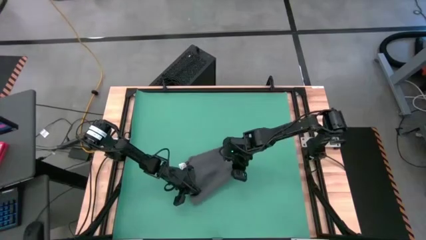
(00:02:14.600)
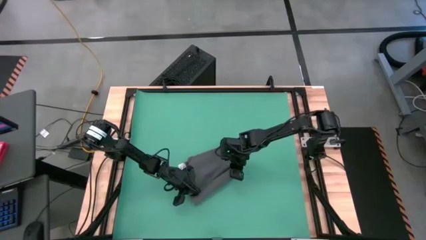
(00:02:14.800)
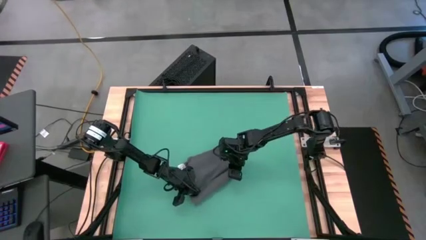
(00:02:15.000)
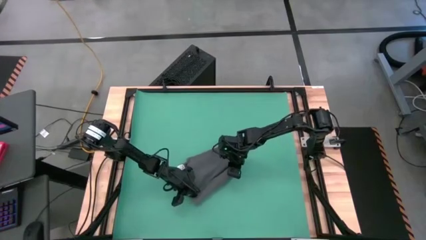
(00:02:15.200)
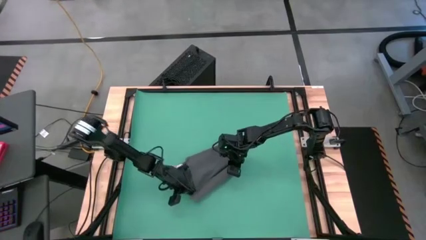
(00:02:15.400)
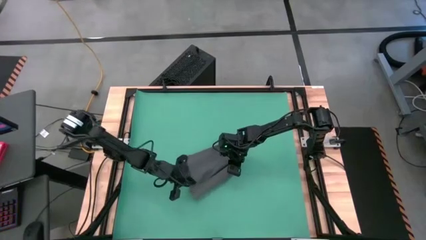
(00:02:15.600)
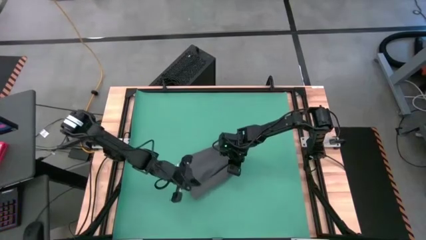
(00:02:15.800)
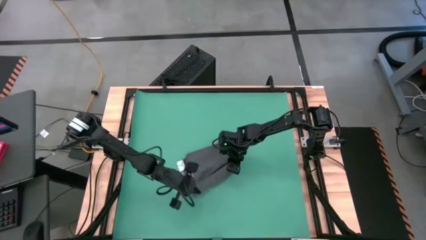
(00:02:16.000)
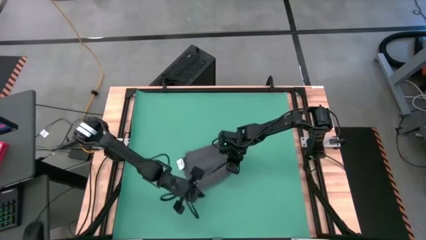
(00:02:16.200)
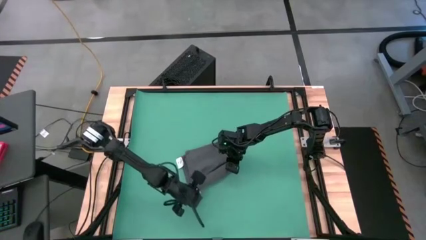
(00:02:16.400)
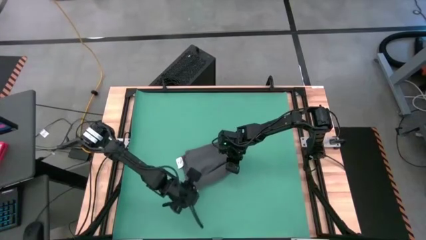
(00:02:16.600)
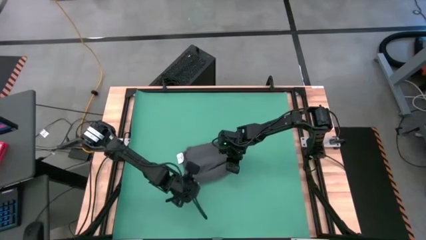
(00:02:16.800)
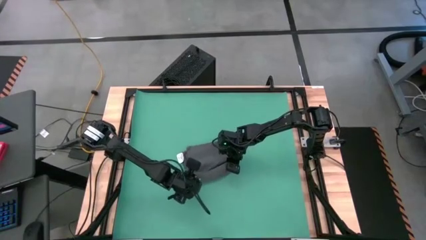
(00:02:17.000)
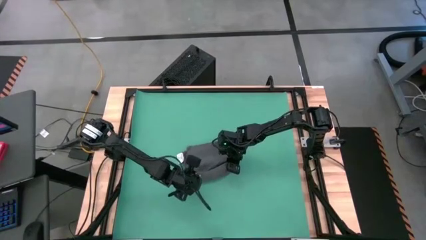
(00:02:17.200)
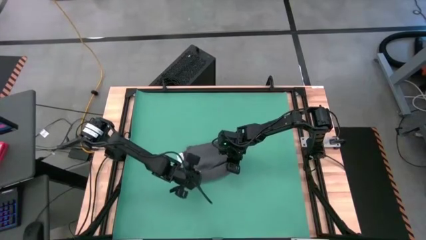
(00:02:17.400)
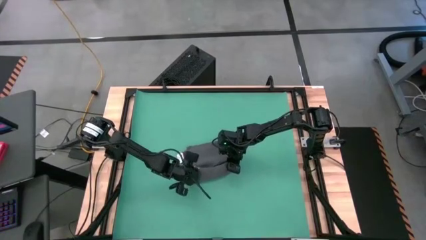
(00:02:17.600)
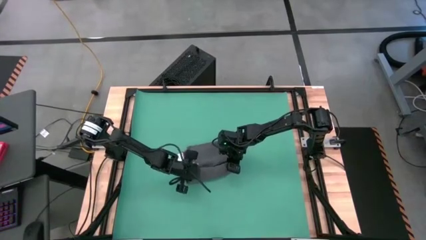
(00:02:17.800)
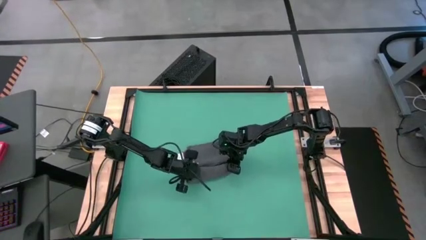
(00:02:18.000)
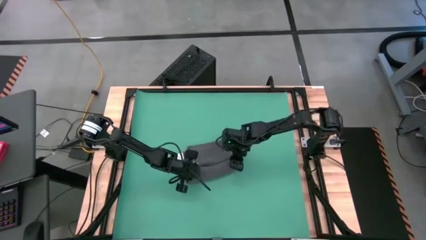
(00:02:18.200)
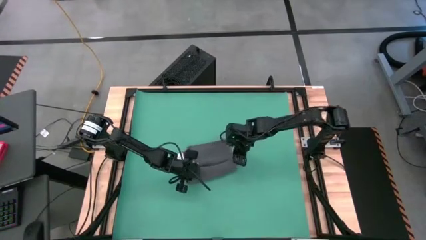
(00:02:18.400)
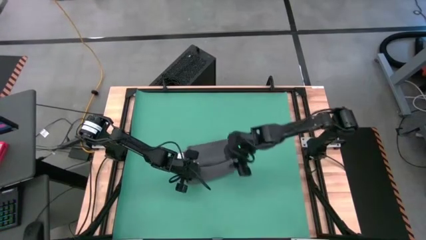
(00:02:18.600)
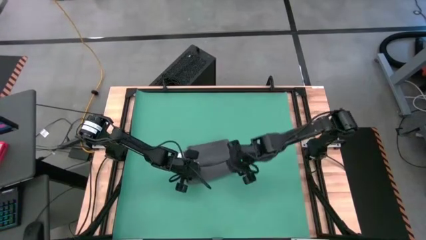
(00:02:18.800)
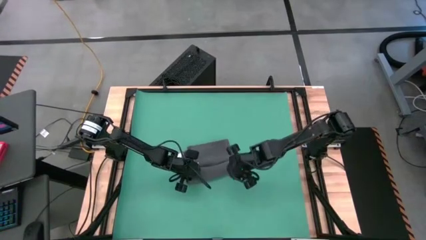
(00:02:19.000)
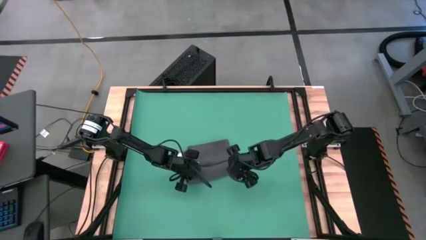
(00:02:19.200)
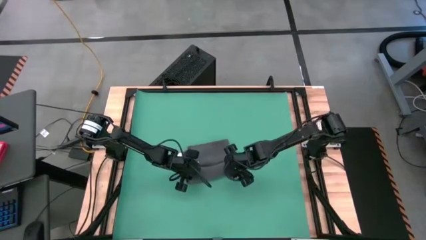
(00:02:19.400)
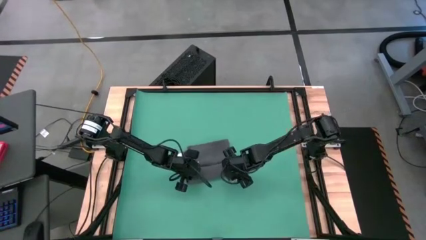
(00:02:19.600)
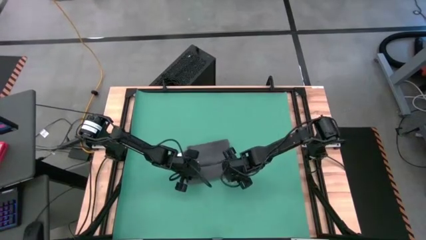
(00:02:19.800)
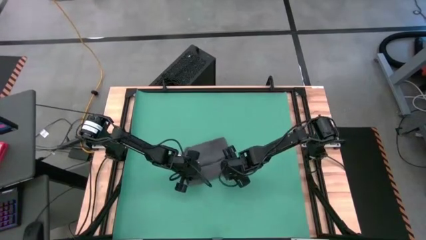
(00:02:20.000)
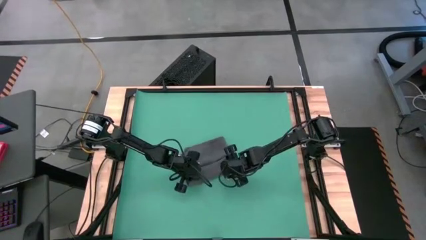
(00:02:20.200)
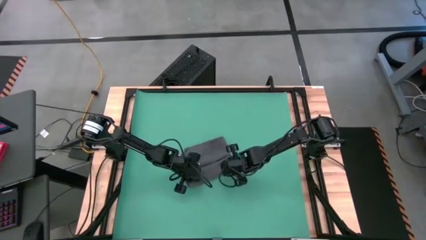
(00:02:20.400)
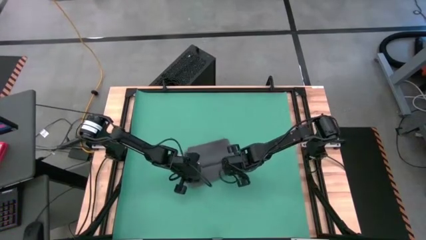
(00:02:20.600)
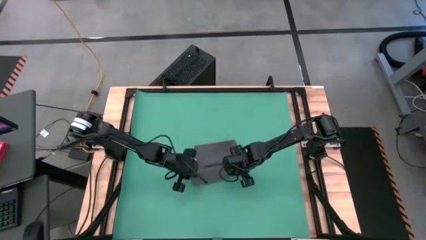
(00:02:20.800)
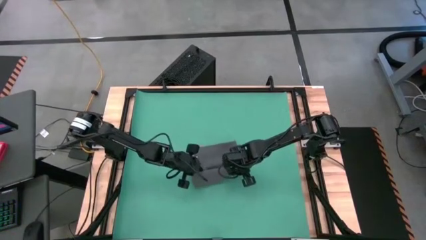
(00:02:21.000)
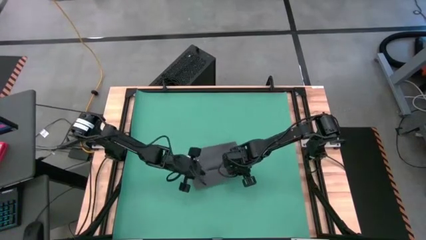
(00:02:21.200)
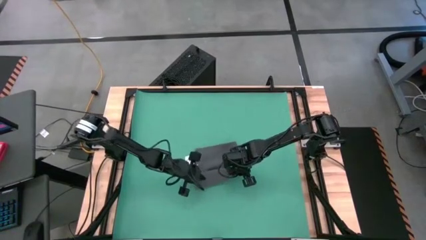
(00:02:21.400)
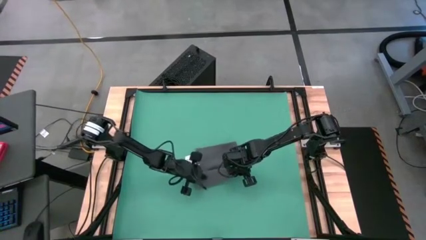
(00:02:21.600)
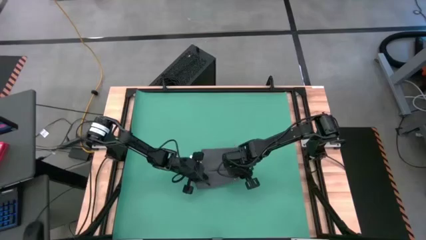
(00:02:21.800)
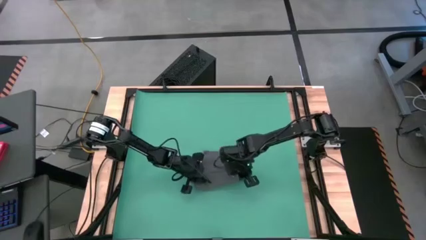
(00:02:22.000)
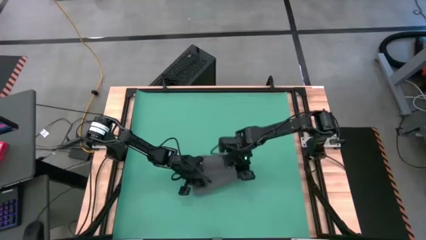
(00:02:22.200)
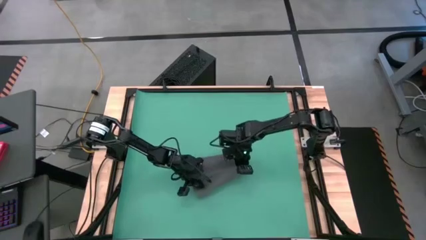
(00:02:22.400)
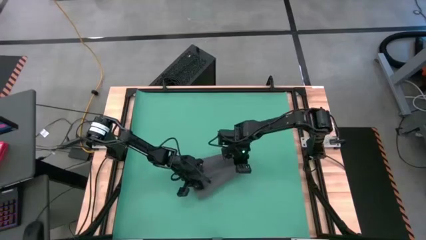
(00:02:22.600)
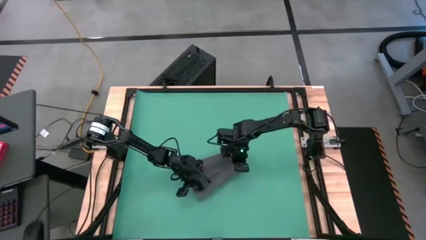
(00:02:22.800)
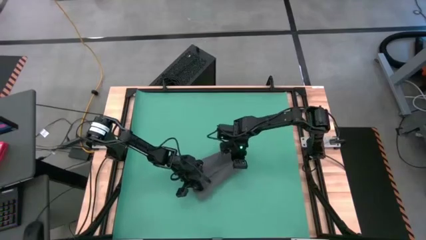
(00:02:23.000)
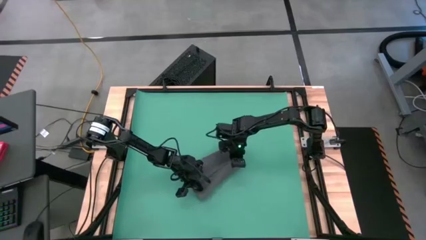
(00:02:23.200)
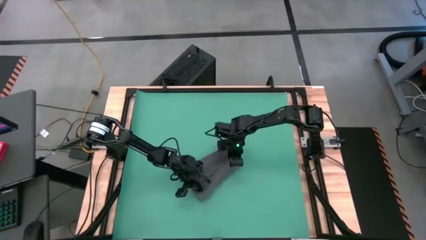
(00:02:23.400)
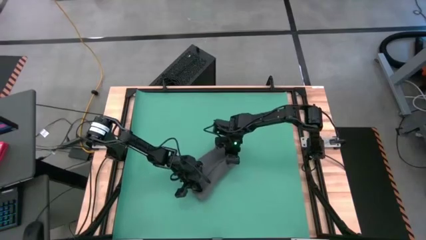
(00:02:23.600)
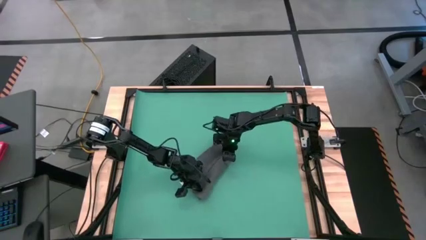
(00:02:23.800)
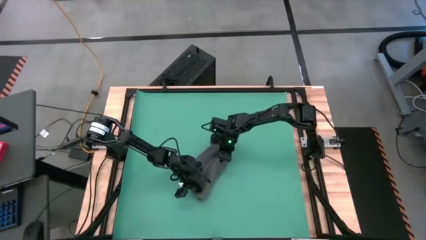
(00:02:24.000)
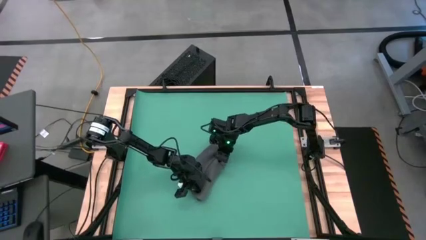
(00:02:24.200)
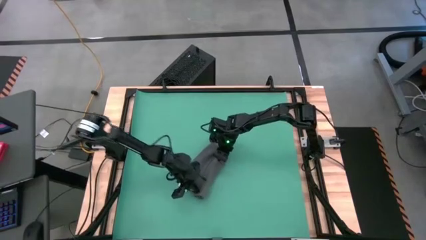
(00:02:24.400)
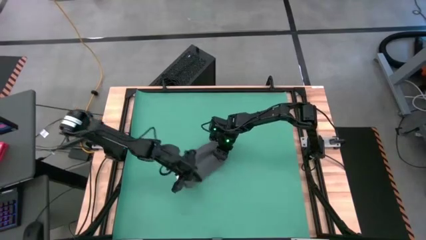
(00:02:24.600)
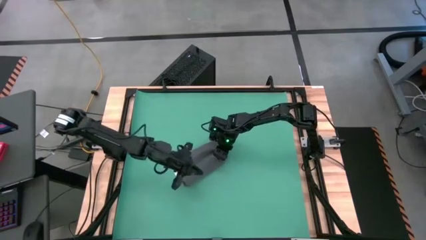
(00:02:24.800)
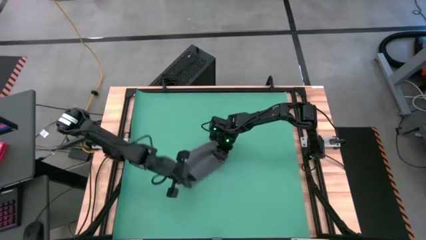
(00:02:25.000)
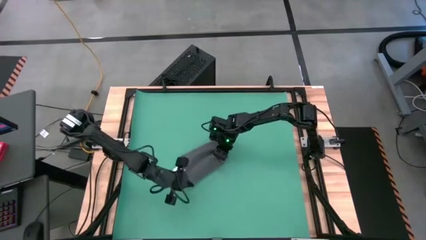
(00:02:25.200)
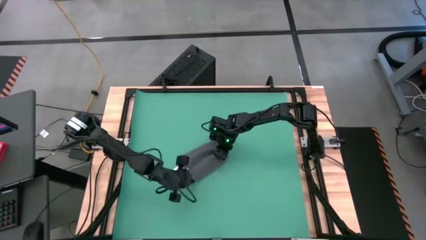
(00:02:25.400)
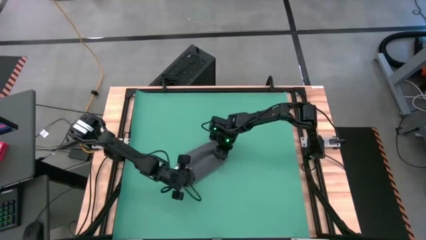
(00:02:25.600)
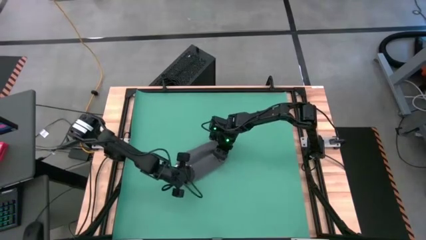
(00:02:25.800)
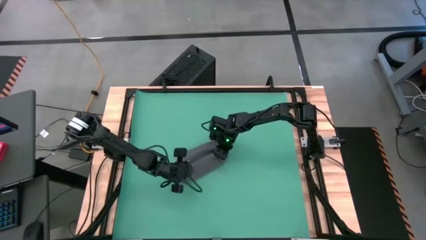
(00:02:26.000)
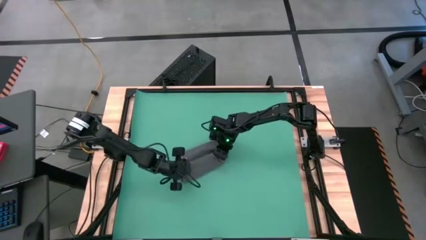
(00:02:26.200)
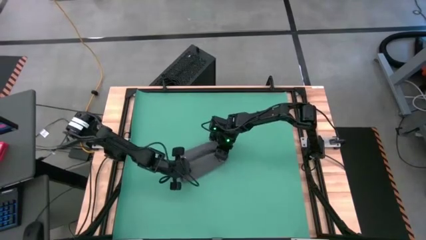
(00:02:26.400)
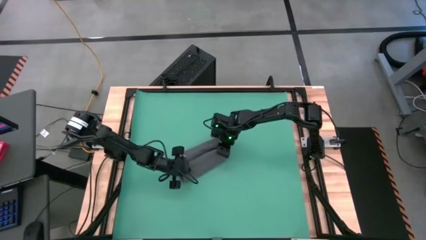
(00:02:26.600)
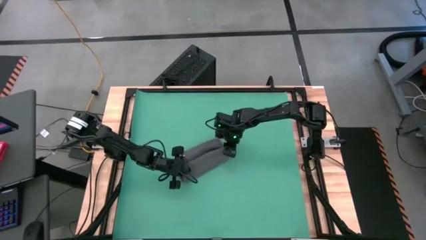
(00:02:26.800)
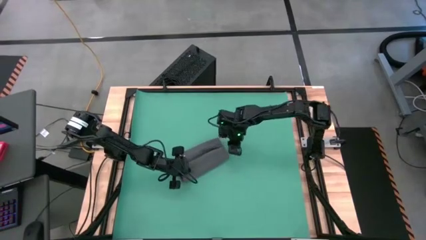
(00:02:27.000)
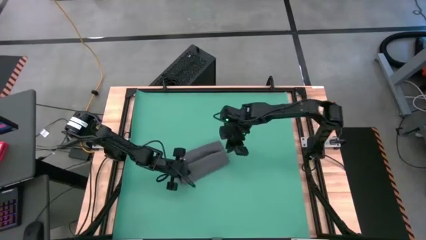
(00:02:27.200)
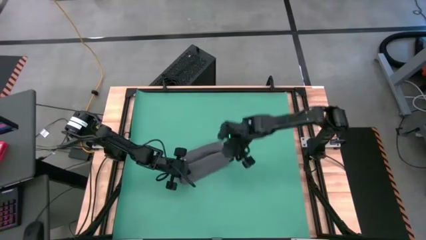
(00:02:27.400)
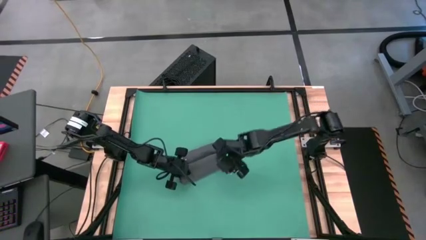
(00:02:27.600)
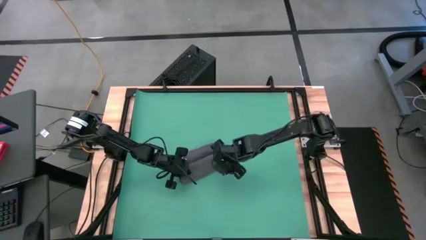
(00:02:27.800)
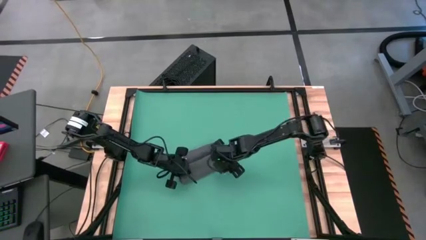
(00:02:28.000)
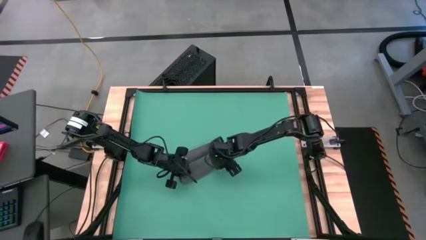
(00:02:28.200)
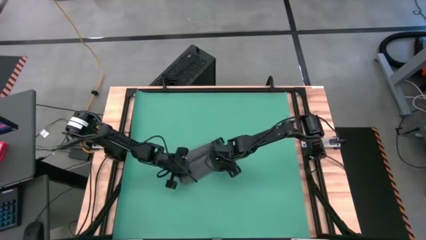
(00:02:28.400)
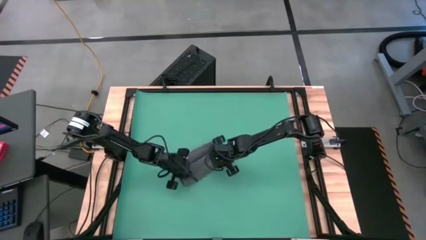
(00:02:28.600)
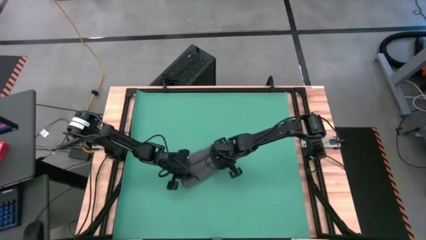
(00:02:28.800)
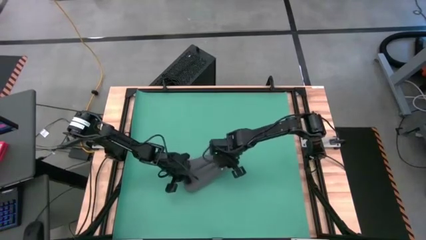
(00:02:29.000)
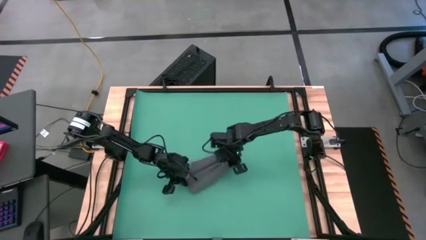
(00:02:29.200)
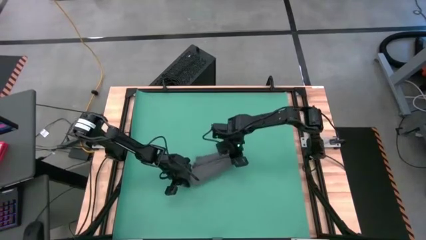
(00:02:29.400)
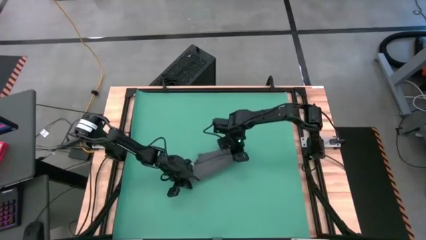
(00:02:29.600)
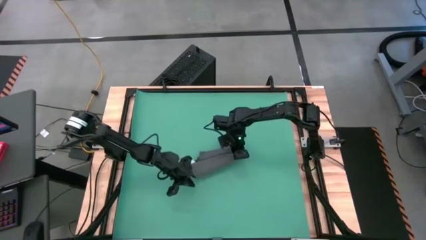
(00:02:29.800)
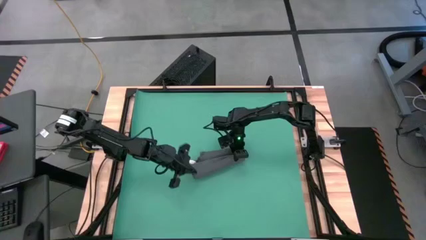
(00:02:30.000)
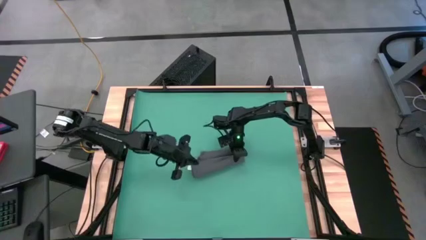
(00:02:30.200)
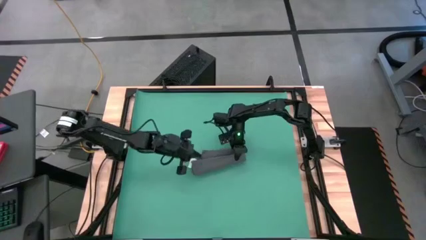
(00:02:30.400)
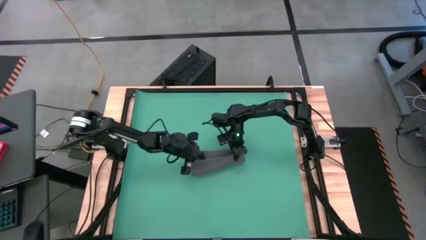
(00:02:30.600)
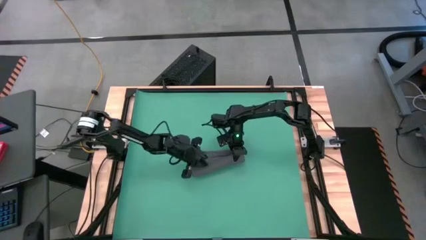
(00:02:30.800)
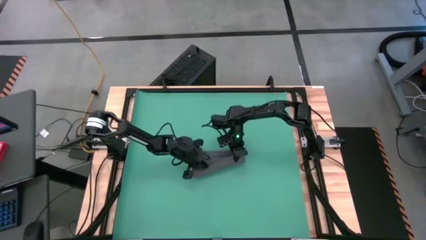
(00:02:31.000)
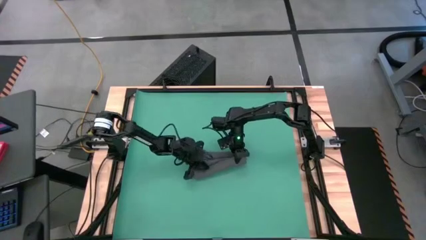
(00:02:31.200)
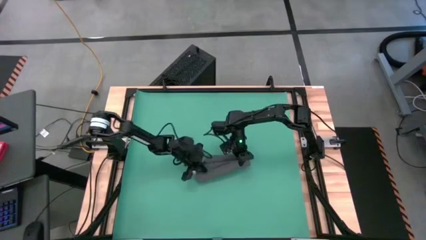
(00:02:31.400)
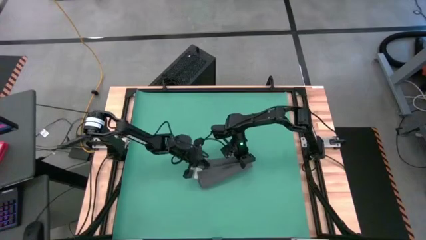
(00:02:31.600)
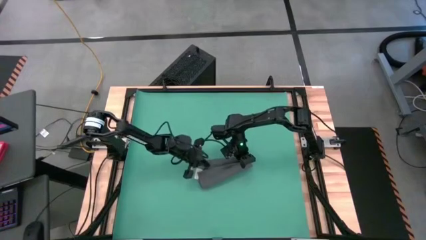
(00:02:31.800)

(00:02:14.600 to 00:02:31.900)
Task: Roll towel
Roll the gray towel on the table
